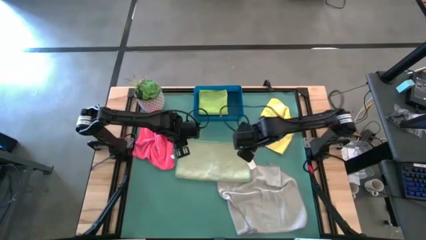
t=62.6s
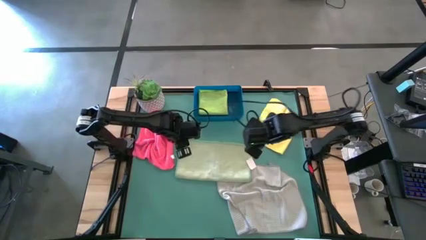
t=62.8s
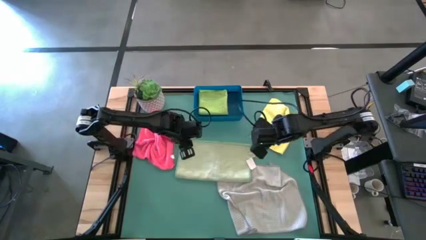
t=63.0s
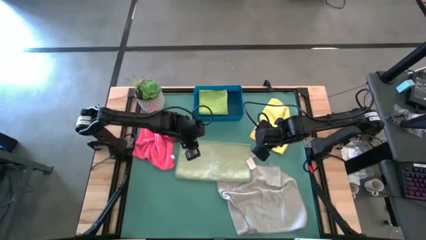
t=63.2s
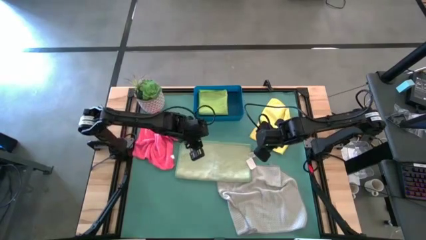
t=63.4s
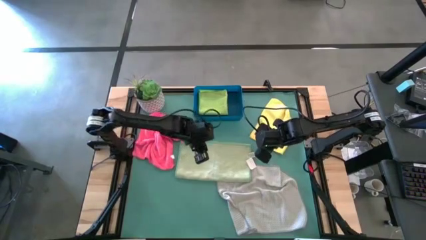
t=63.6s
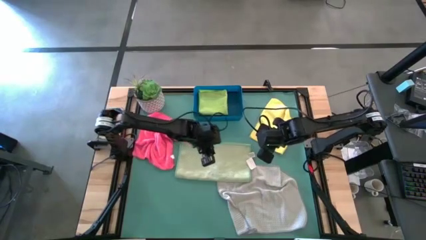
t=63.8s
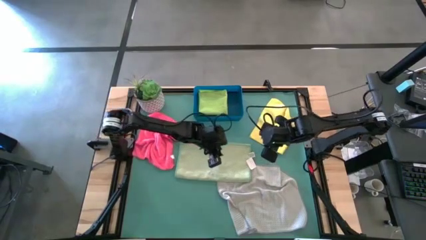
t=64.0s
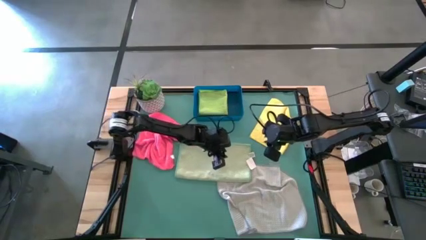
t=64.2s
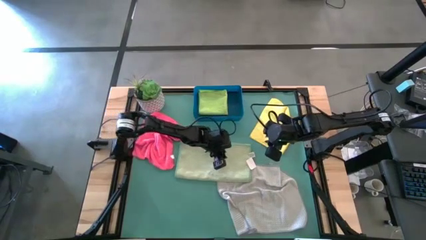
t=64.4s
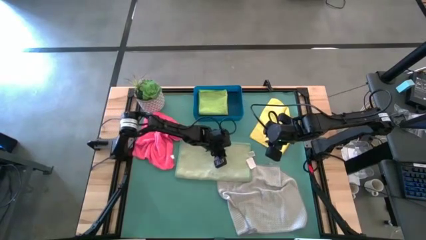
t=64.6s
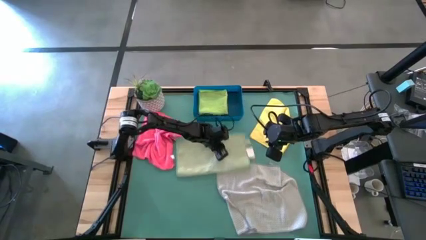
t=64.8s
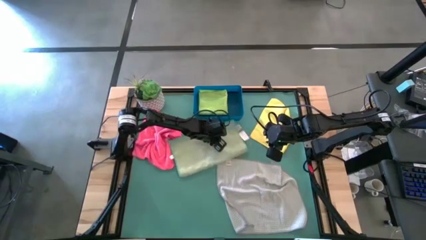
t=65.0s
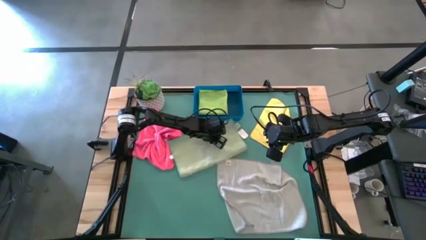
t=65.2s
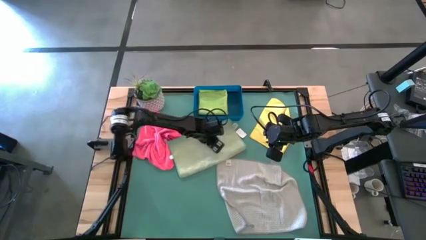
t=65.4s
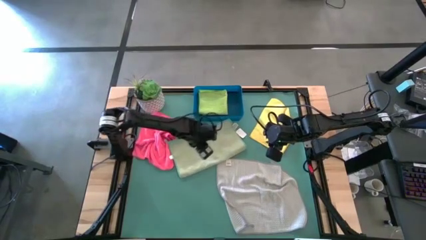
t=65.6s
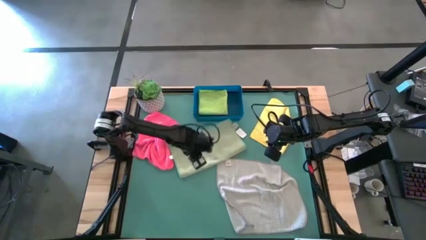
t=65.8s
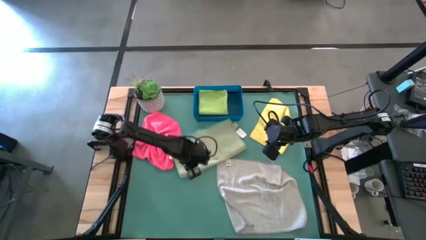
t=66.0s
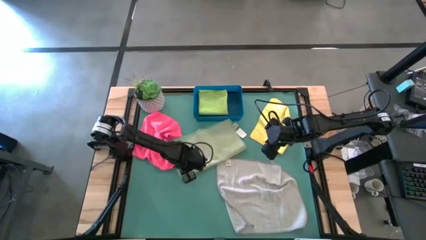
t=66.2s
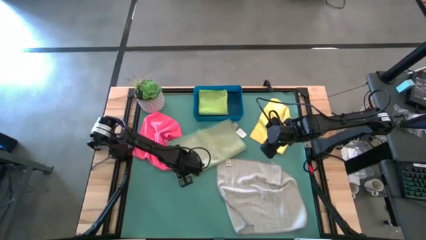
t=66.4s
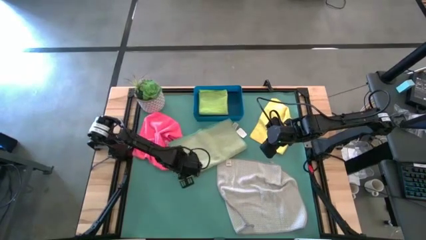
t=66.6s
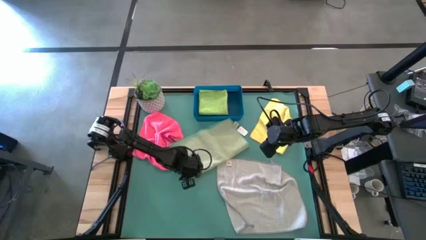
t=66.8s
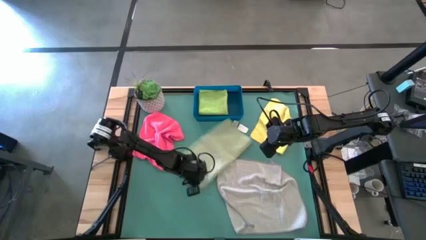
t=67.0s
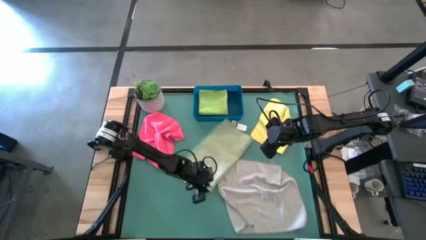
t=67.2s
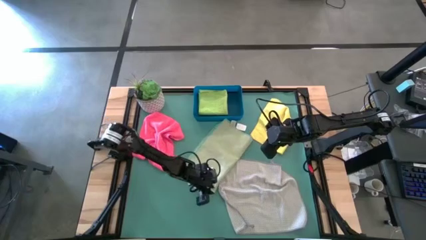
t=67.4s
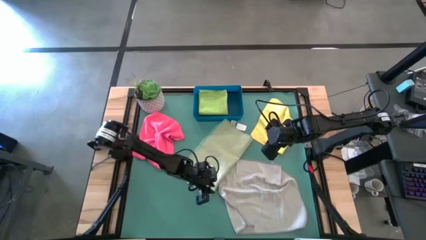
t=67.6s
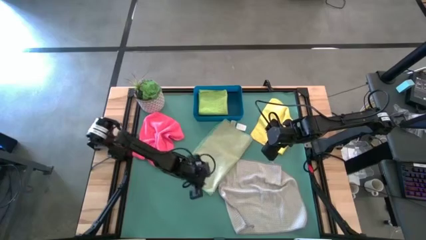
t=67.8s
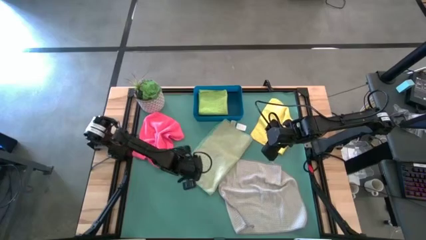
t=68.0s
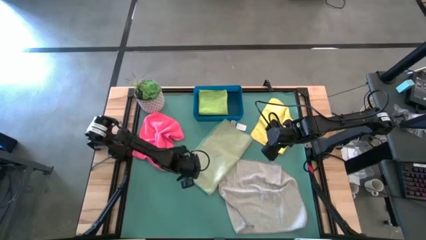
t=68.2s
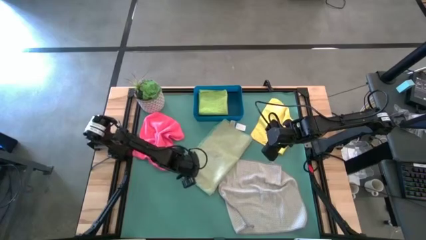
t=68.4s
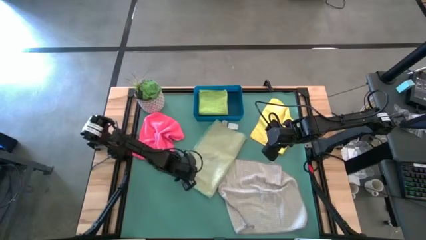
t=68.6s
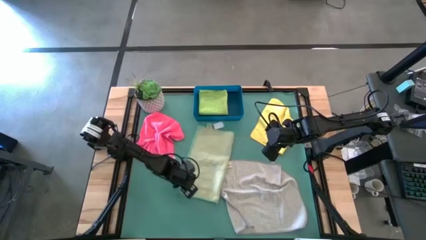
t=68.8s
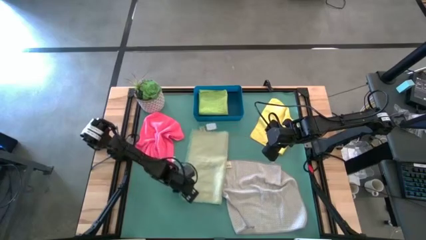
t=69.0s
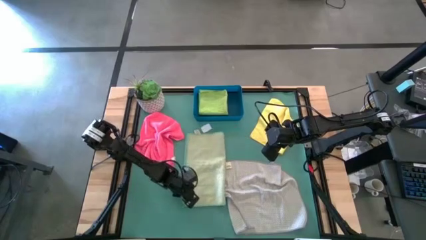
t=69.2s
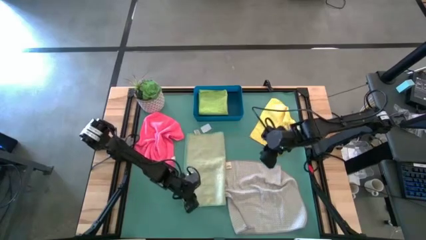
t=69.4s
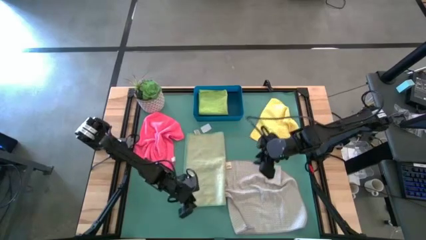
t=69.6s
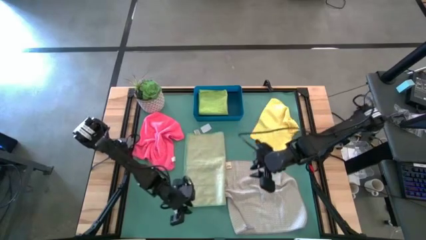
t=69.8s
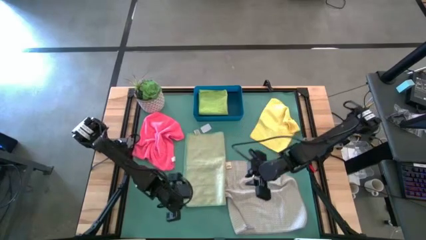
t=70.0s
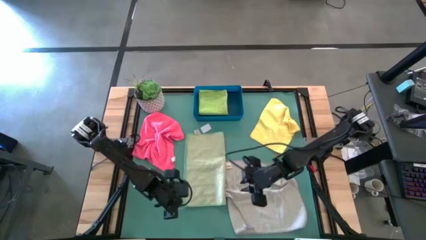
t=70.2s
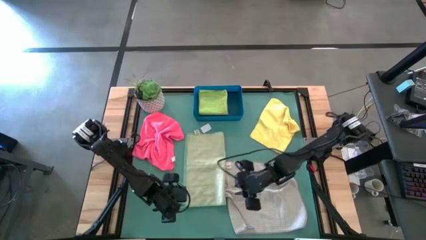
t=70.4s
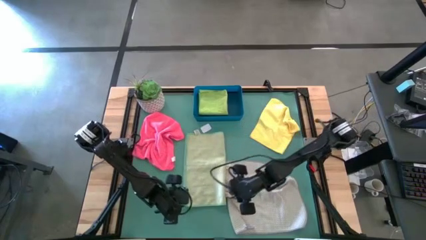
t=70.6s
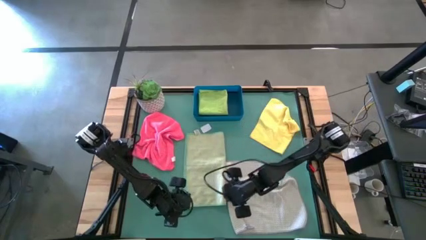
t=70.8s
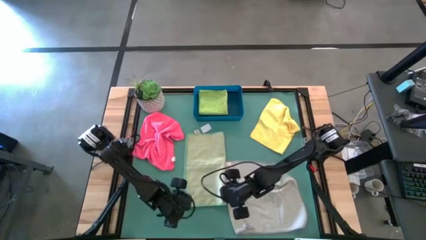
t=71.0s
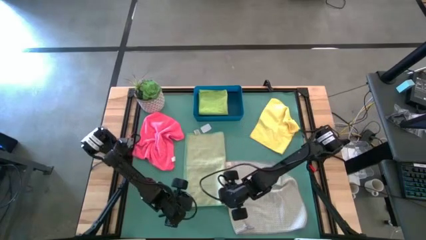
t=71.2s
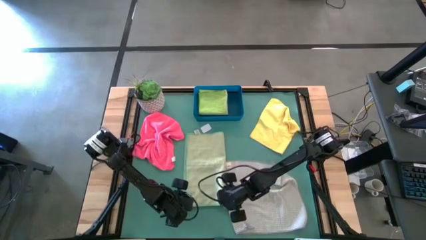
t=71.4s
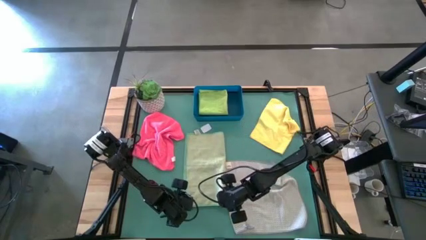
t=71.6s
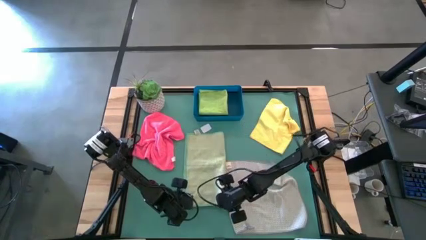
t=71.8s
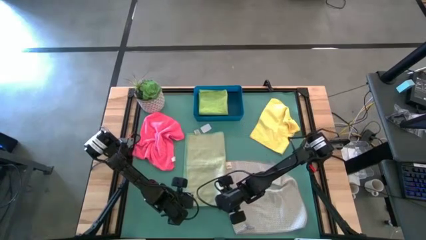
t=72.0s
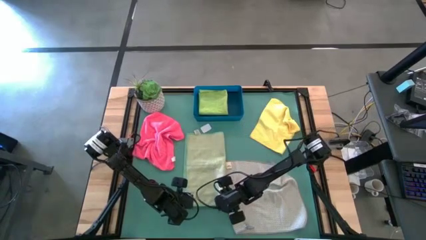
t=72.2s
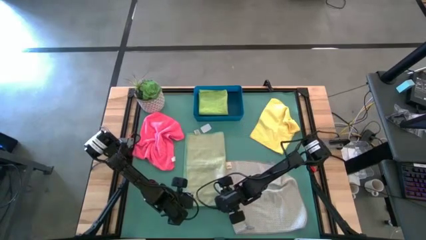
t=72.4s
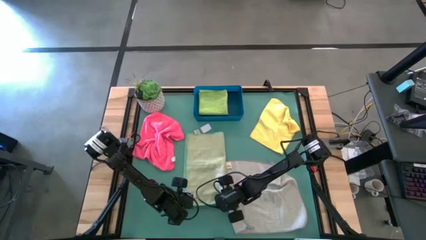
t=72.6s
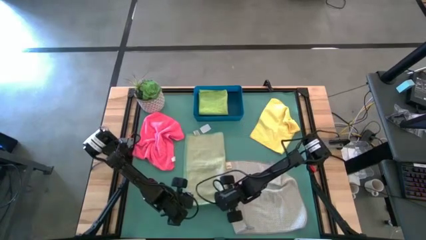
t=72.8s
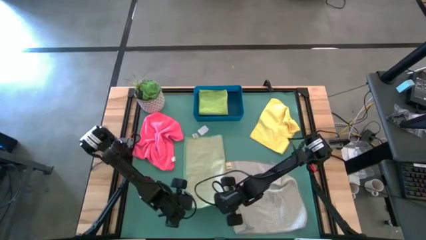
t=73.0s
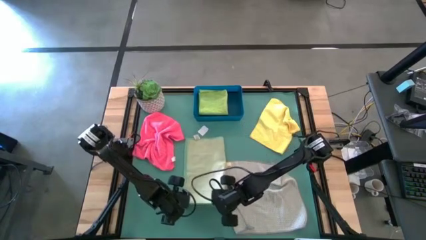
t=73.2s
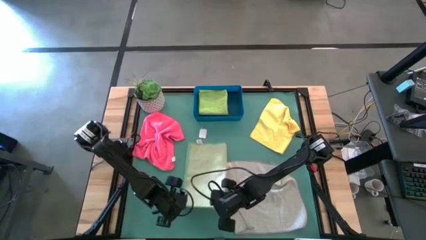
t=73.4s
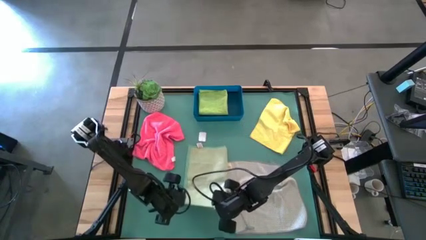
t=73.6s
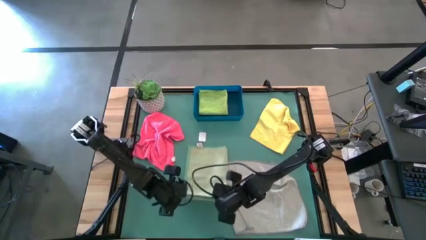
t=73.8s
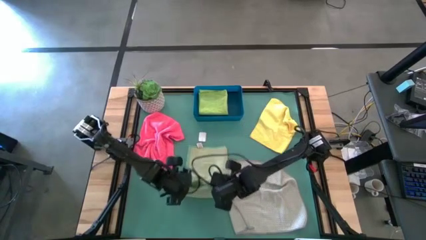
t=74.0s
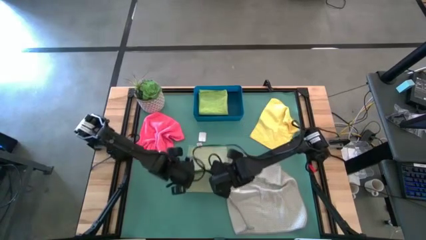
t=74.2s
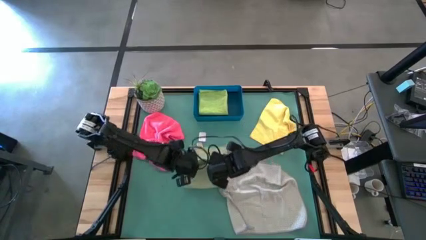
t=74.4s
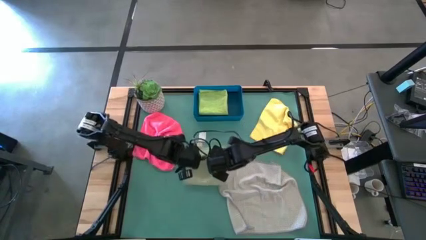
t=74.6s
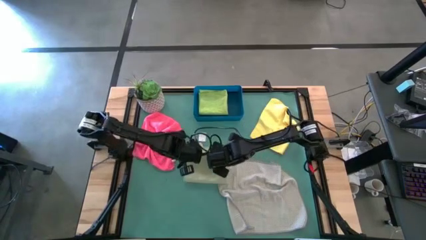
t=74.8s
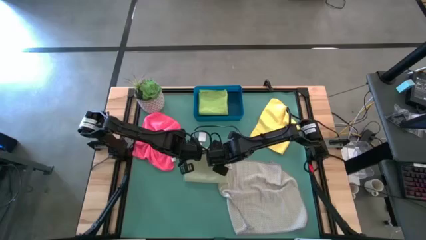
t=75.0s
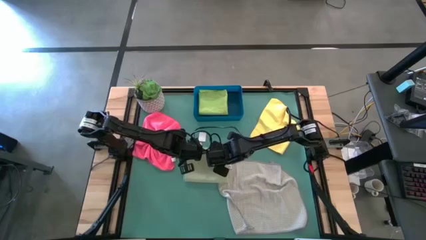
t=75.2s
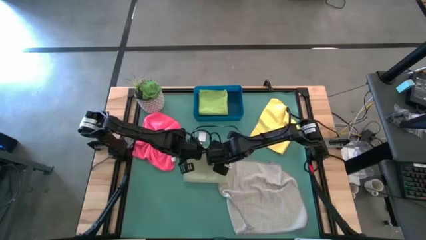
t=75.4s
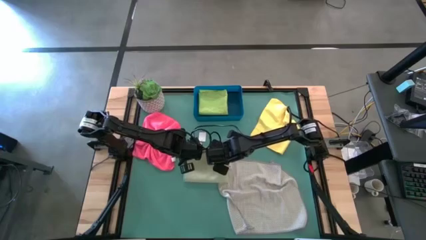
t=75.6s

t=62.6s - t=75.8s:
Task: Fold microfiber towels
Fold the light green microfiber towel

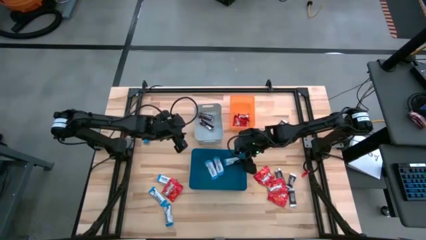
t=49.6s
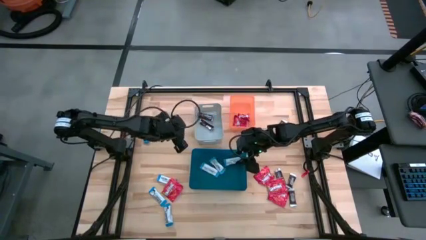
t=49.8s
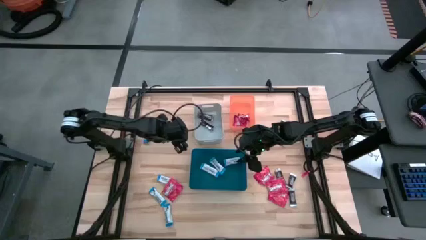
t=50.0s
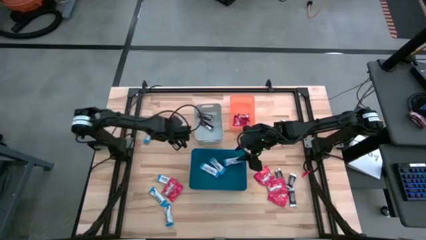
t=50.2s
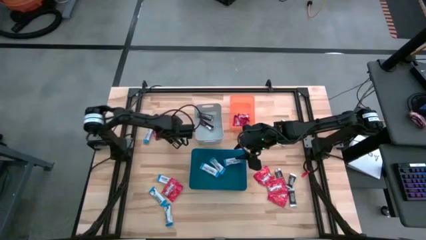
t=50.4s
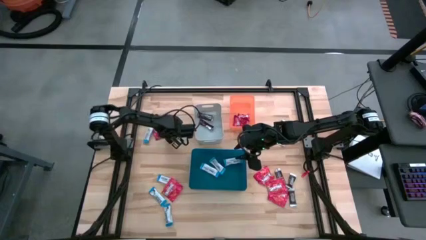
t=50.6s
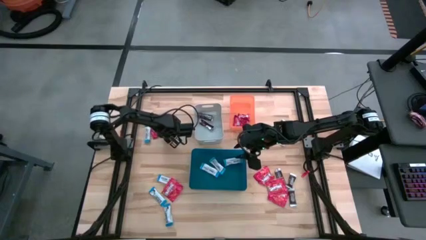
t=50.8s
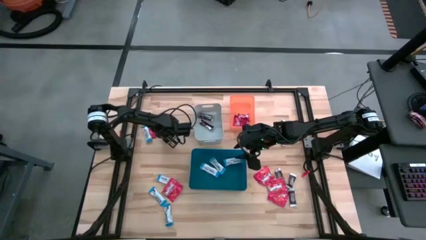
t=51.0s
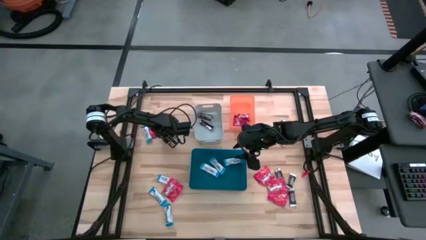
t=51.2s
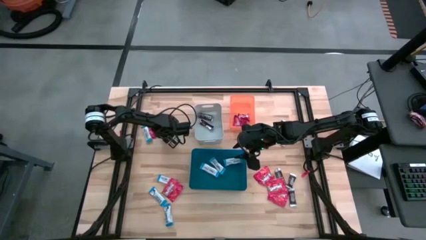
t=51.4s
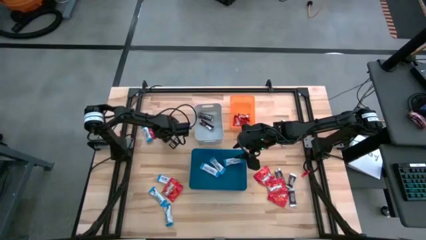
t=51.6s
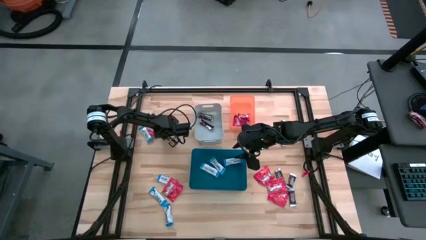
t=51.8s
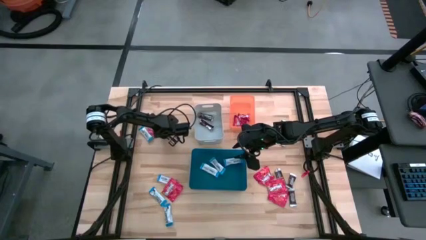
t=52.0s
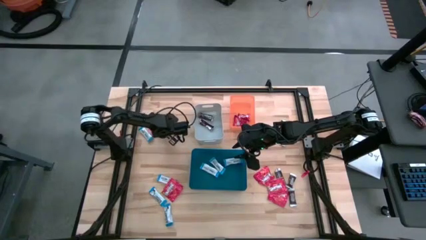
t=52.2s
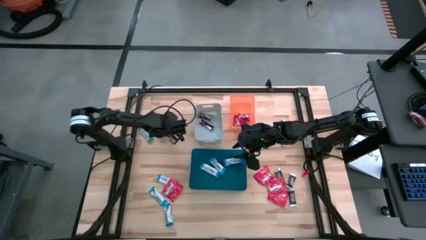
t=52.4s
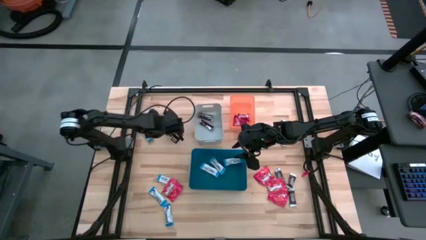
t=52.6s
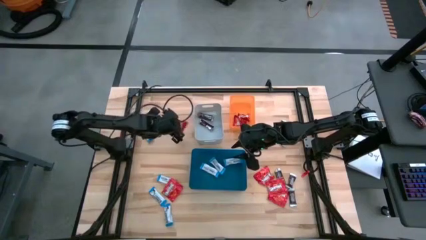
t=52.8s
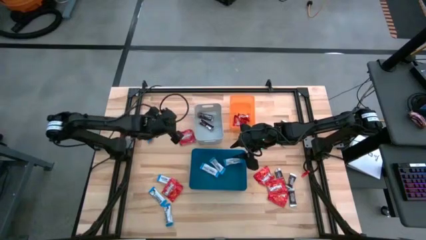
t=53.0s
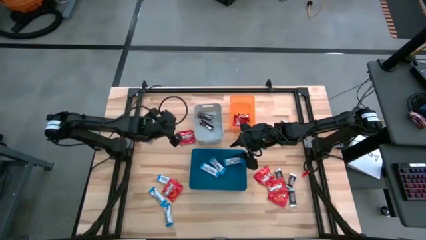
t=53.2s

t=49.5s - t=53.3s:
Task: Sort candy
Put the red chocolate into the orange bin

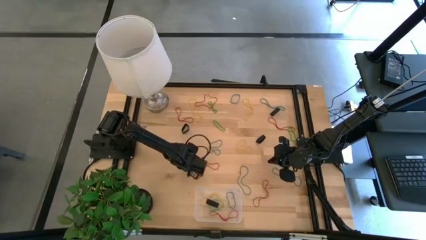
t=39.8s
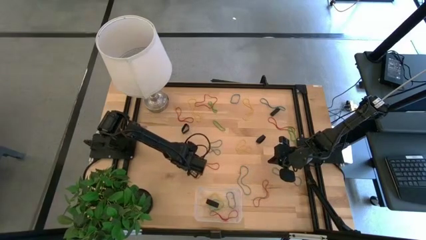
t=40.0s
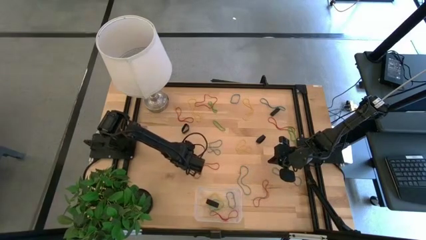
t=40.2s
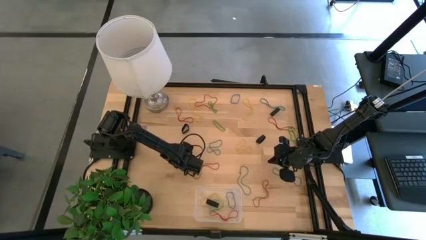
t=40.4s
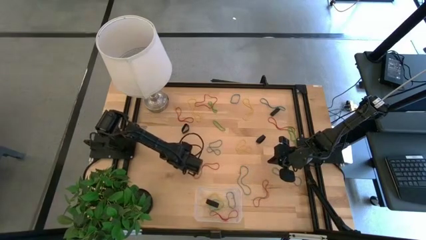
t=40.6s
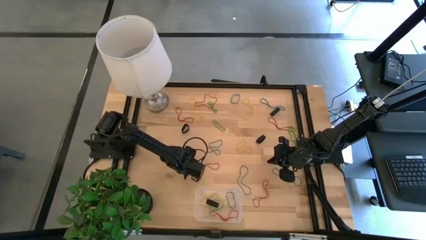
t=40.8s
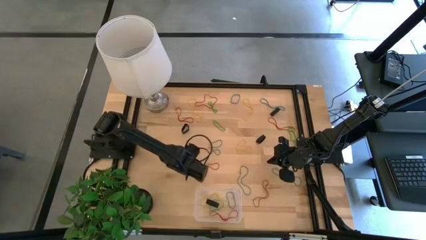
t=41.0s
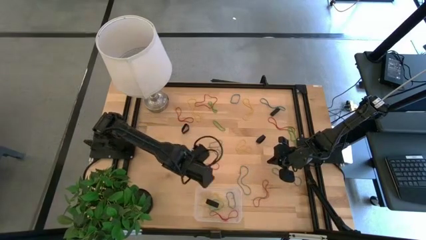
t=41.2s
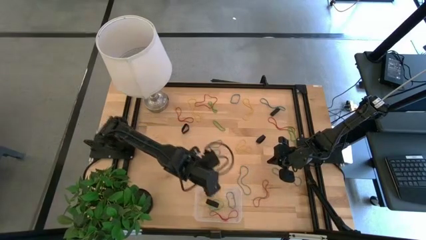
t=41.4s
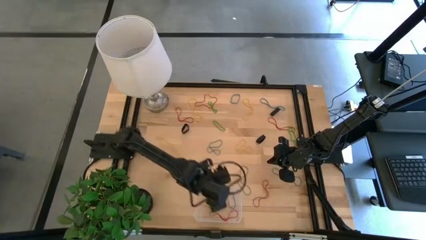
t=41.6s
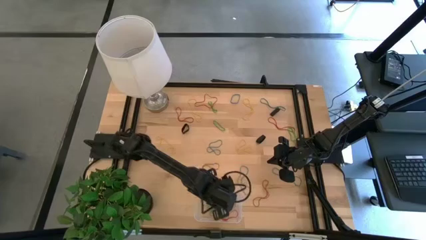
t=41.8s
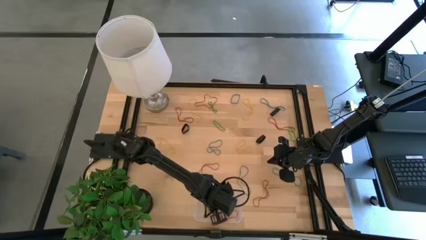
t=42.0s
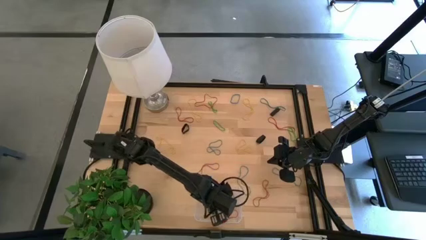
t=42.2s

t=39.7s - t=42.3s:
Task: Pick and place rubber bands into bin
Put the green rubber band into the transparent bin
